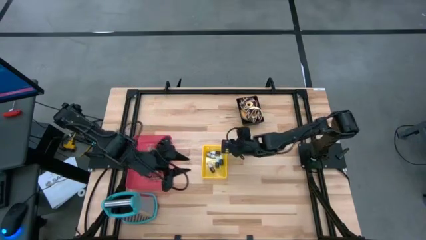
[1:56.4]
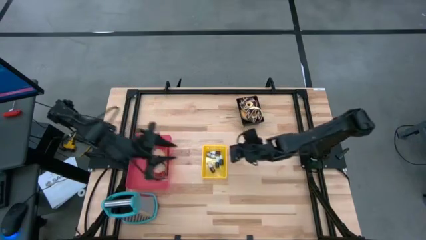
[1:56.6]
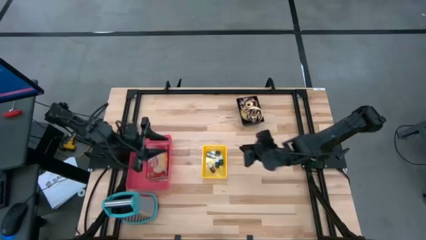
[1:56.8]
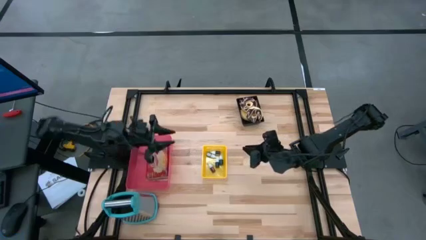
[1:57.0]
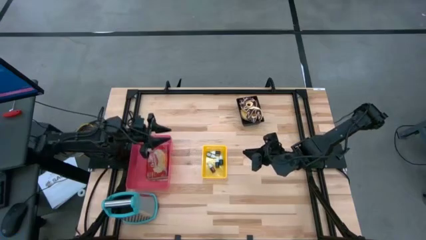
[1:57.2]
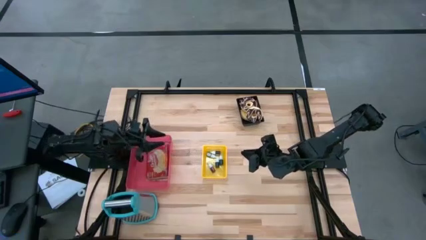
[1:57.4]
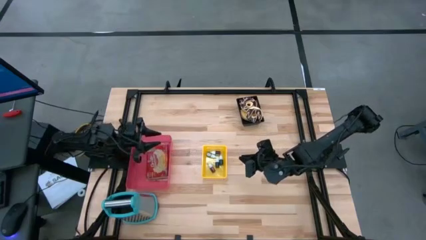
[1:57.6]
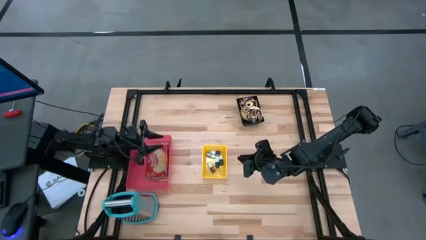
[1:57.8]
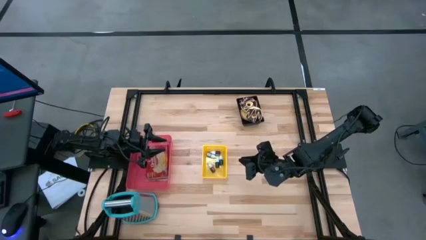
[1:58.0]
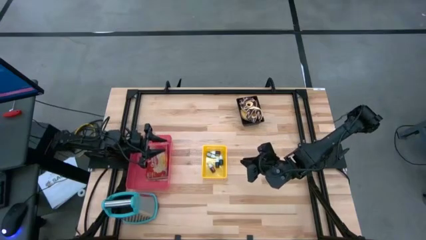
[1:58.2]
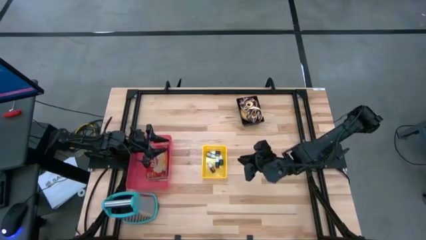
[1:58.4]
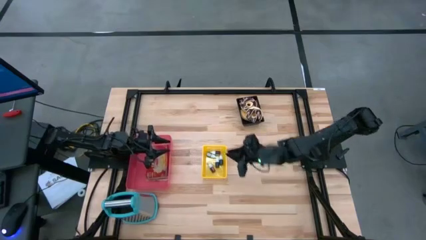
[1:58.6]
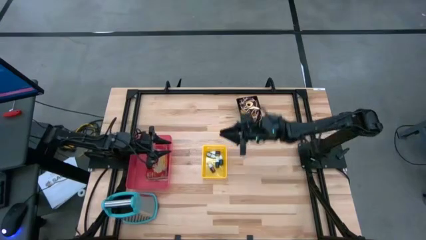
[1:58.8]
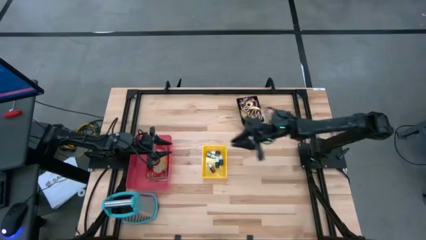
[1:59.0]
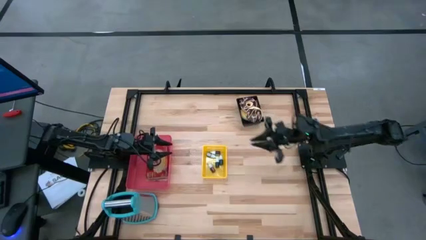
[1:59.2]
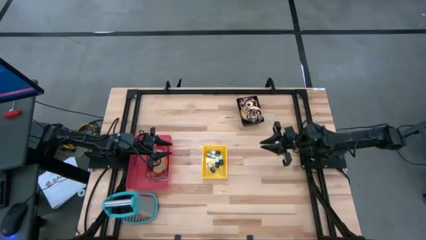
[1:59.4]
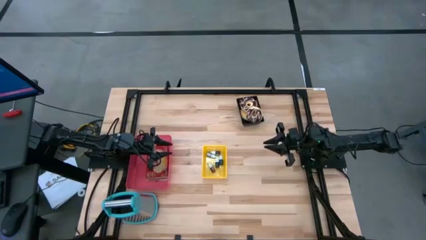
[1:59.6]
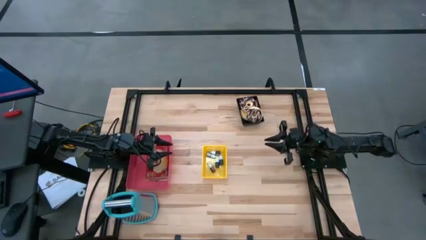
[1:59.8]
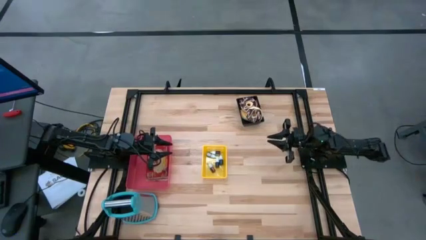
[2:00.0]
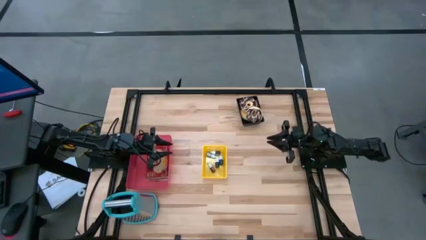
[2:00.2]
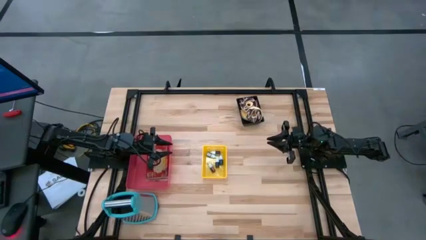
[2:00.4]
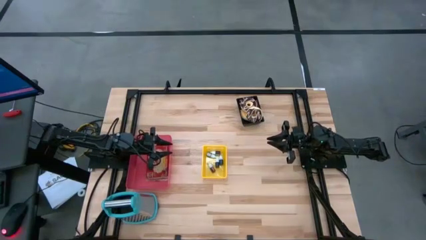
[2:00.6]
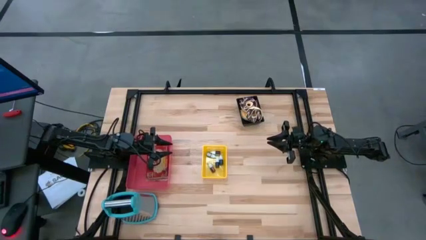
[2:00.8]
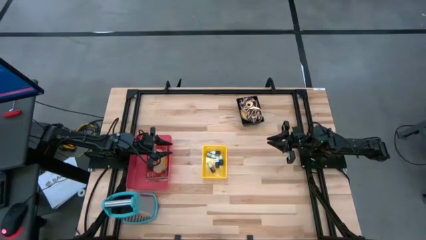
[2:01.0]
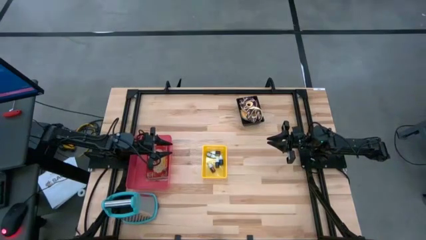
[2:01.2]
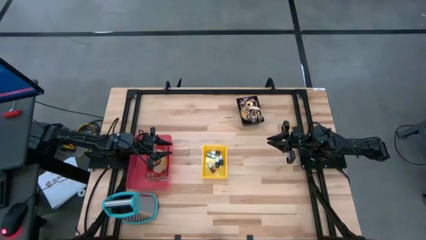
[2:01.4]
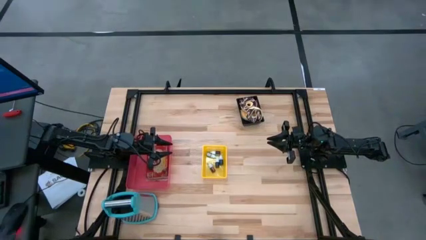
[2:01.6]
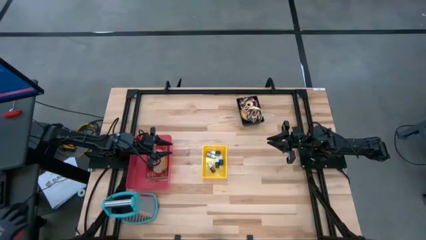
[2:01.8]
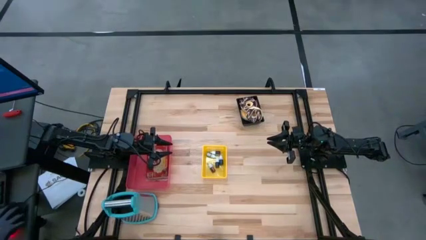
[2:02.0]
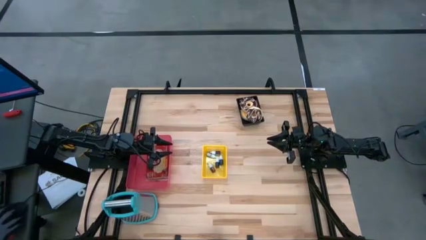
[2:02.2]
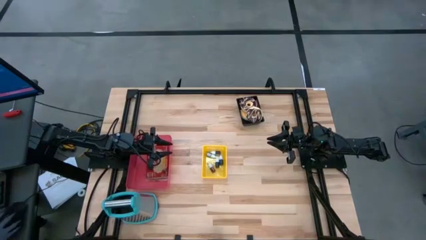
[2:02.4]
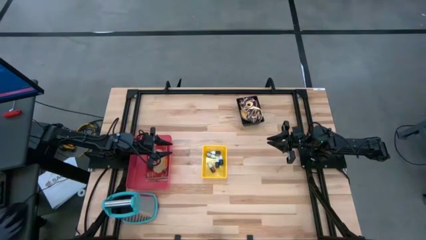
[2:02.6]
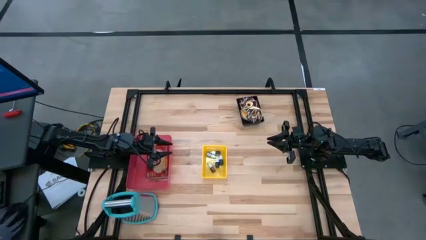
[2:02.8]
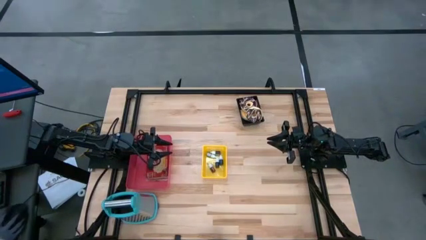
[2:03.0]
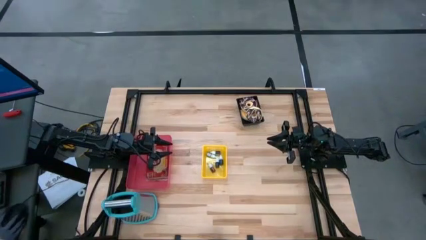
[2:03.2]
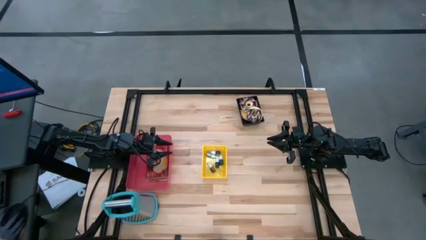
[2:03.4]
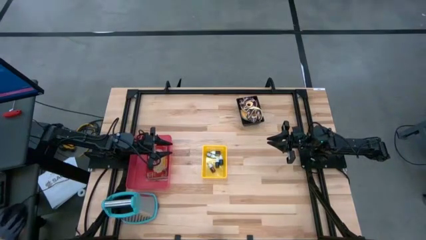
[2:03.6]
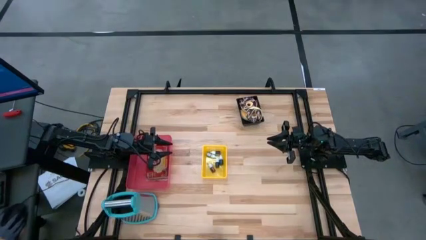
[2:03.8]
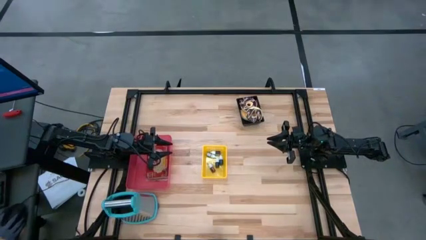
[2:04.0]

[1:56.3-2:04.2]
Return to Home Position

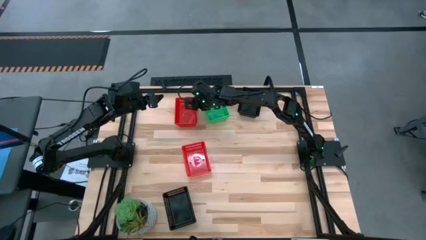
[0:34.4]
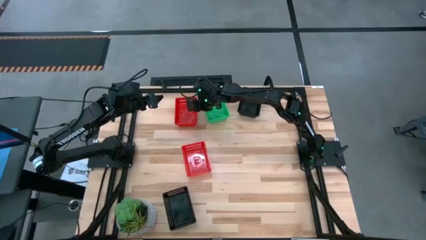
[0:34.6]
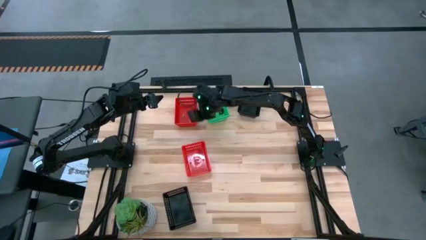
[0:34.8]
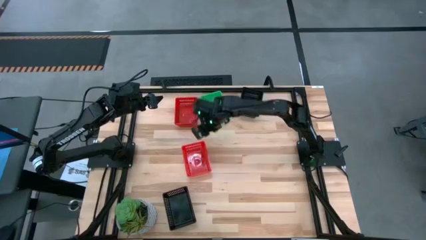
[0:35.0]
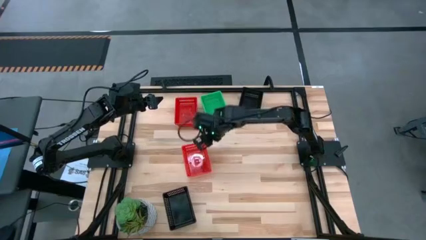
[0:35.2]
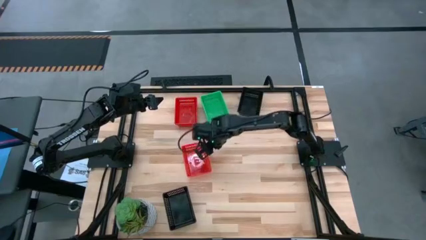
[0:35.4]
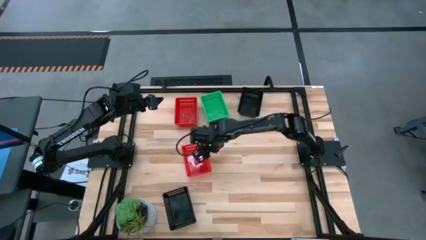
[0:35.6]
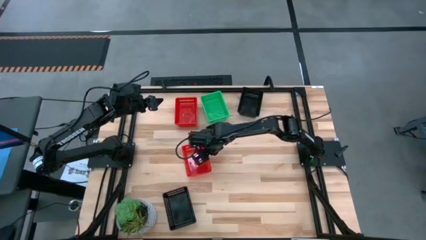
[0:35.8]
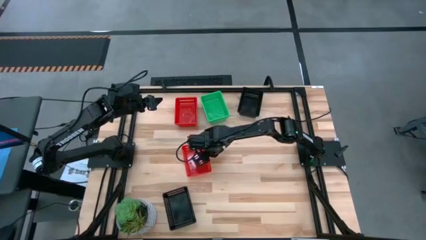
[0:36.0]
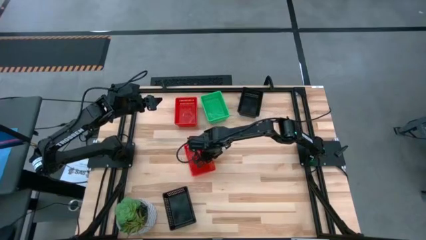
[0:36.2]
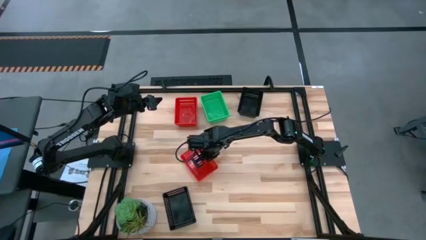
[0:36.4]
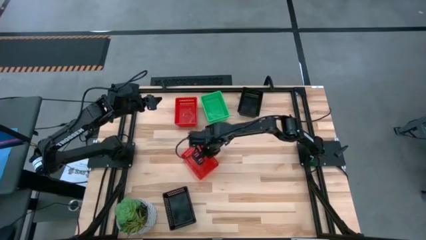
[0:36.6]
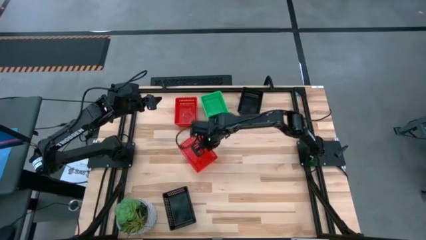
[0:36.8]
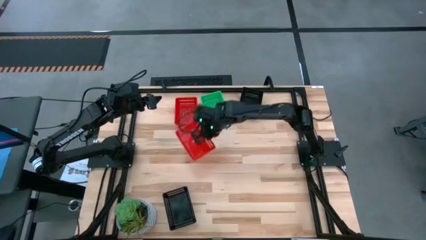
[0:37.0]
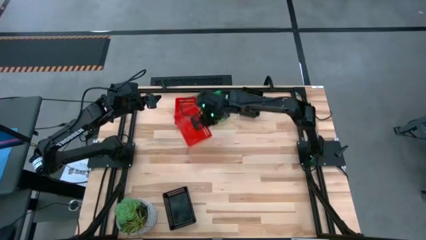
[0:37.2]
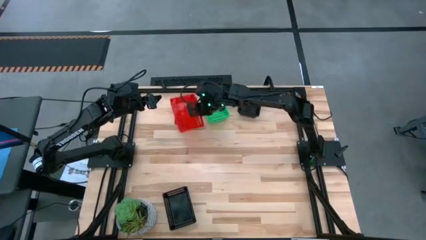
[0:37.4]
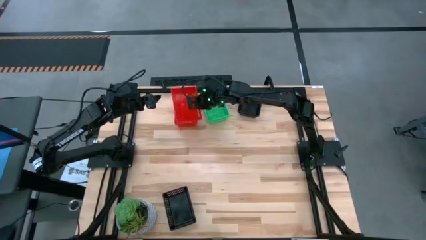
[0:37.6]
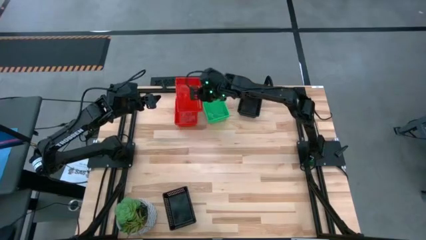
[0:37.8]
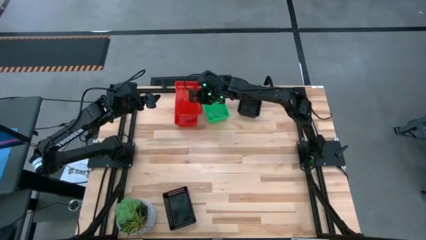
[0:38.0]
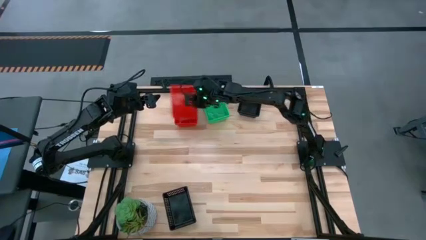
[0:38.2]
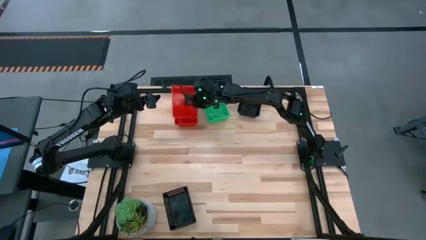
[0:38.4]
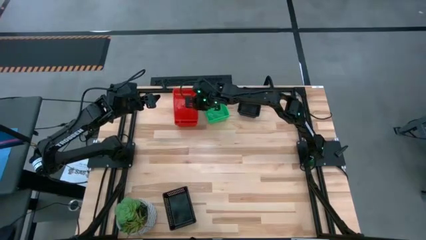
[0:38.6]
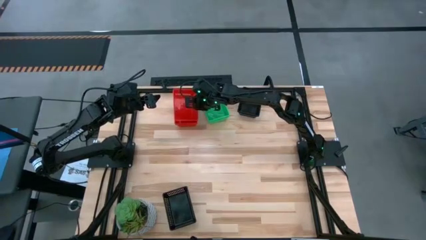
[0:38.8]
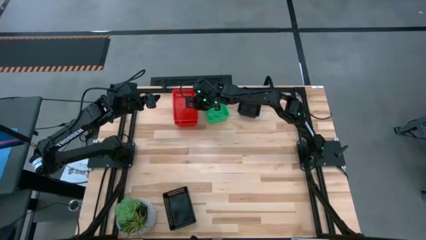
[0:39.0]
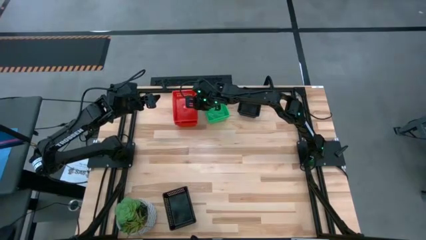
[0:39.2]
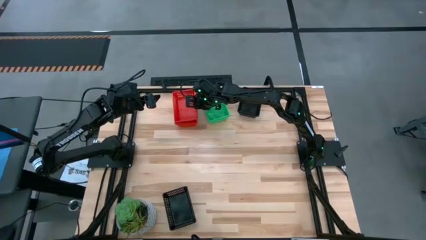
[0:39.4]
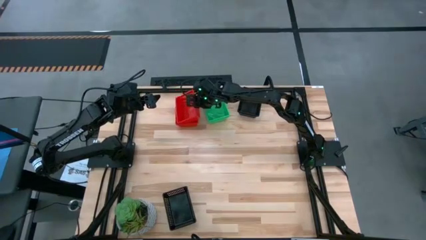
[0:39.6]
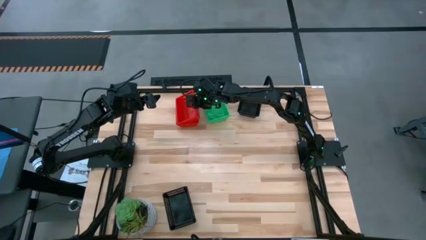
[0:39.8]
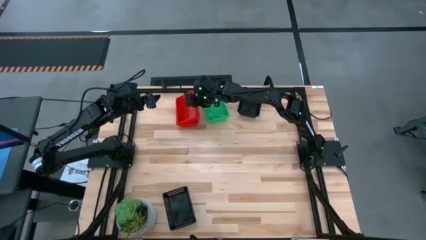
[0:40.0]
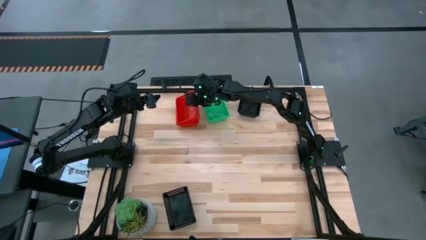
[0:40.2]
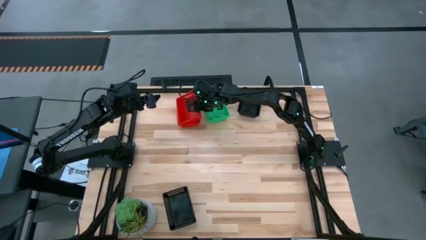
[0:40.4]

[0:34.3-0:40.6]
Stack the bottom red bin on top of the top red bins
